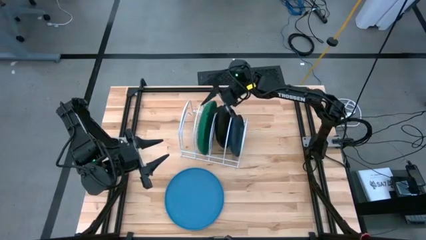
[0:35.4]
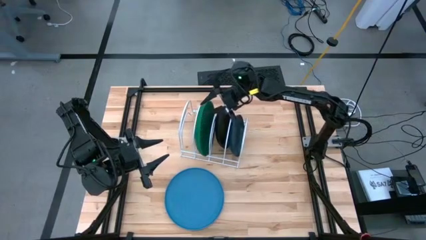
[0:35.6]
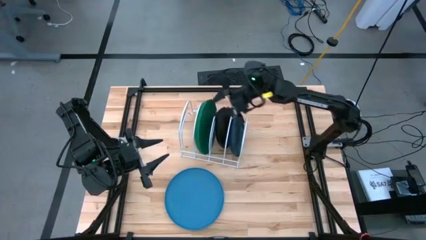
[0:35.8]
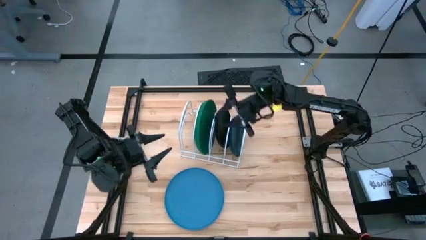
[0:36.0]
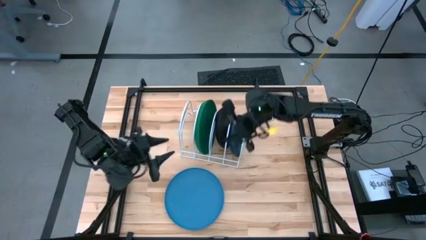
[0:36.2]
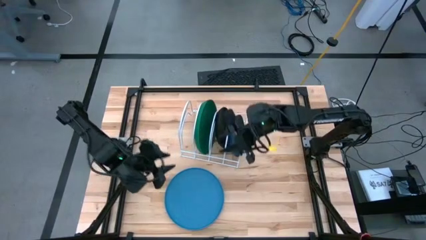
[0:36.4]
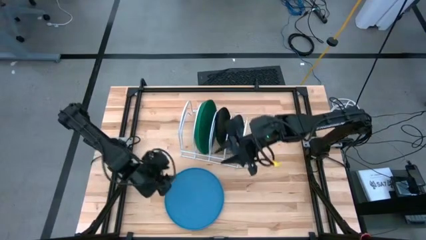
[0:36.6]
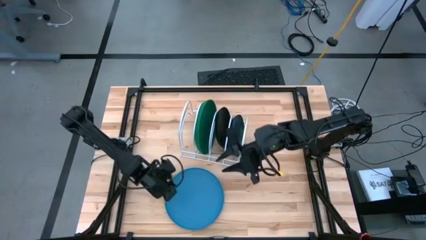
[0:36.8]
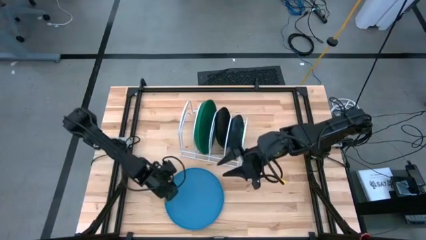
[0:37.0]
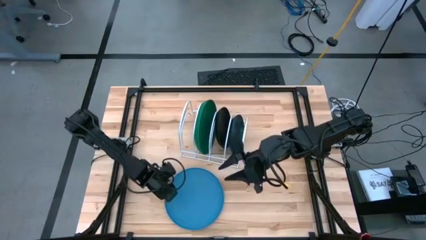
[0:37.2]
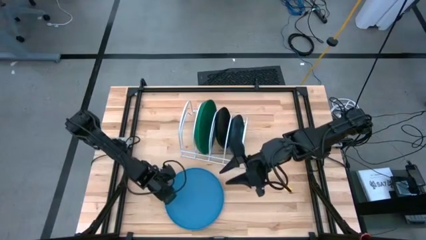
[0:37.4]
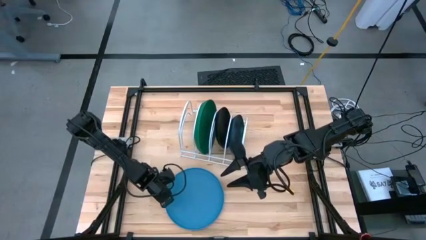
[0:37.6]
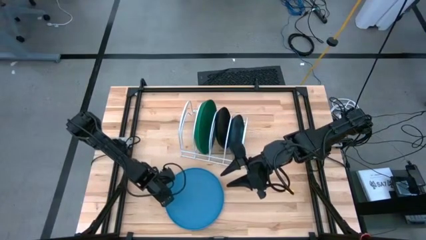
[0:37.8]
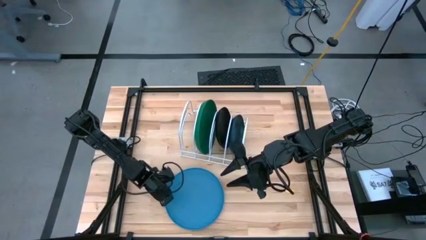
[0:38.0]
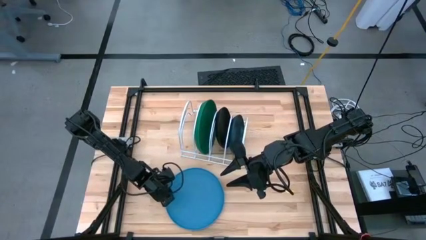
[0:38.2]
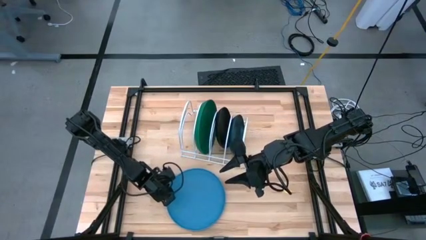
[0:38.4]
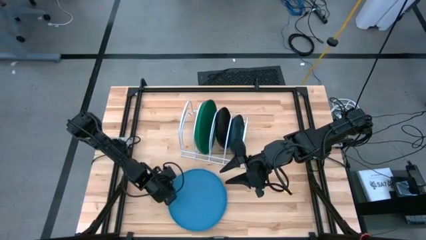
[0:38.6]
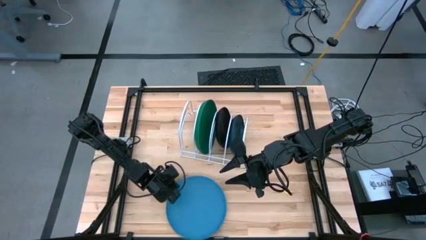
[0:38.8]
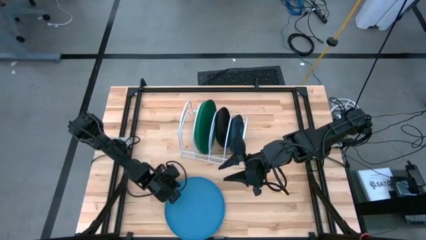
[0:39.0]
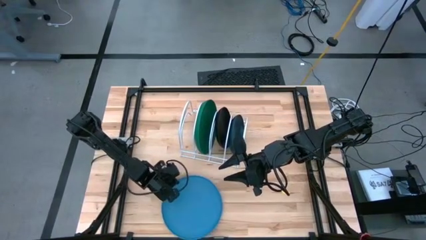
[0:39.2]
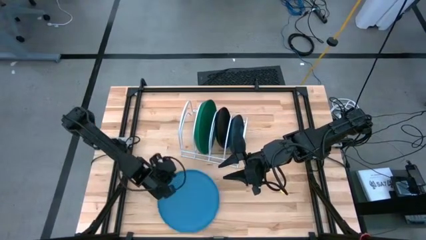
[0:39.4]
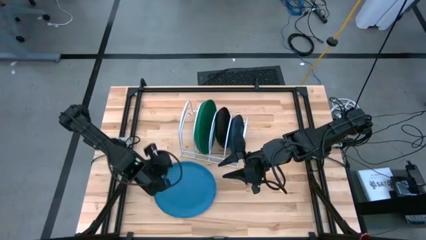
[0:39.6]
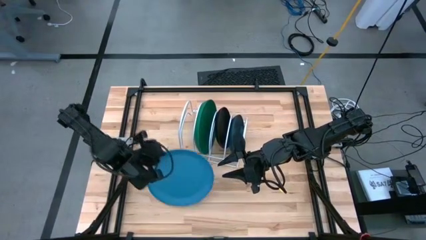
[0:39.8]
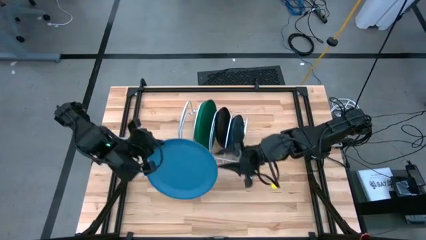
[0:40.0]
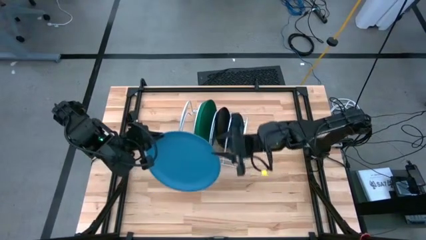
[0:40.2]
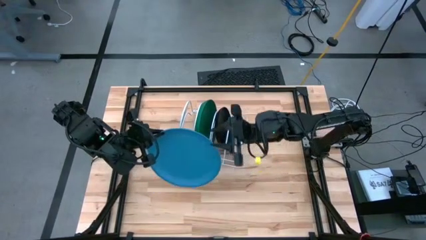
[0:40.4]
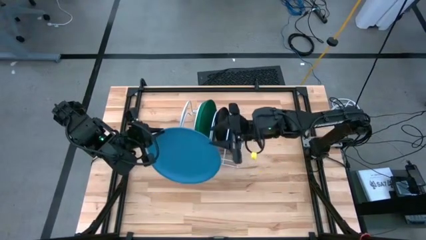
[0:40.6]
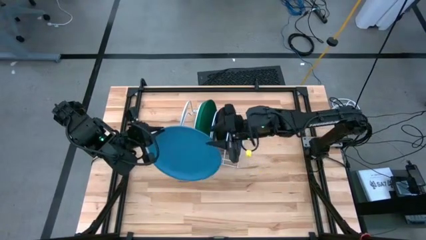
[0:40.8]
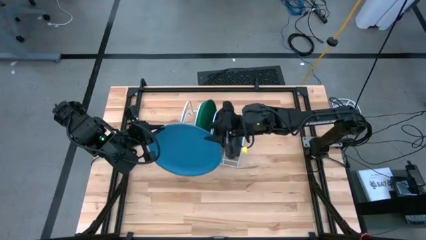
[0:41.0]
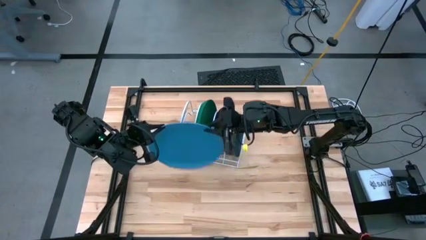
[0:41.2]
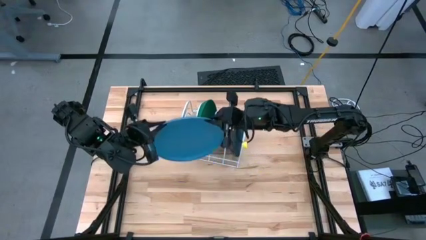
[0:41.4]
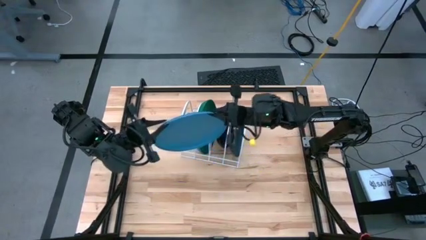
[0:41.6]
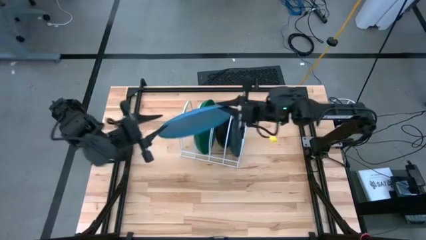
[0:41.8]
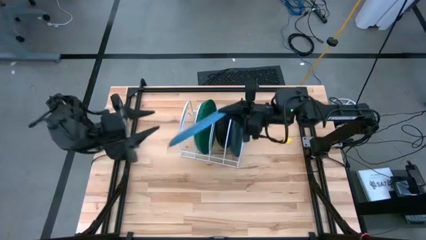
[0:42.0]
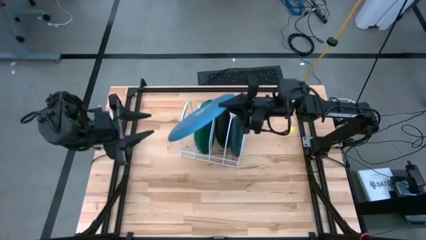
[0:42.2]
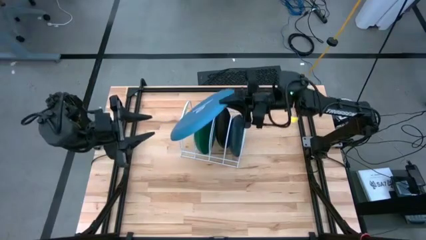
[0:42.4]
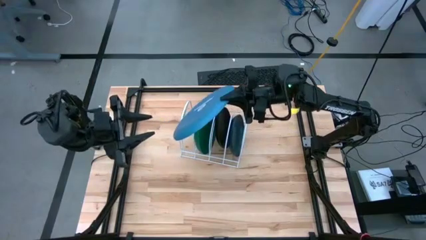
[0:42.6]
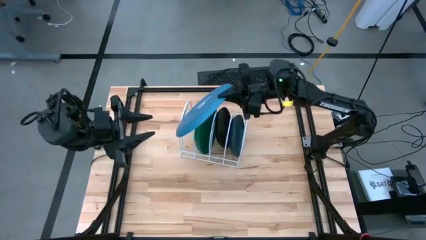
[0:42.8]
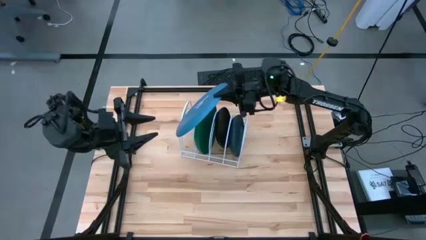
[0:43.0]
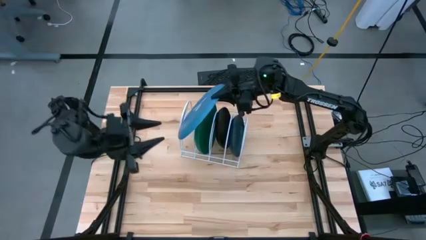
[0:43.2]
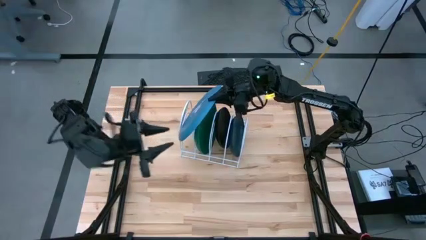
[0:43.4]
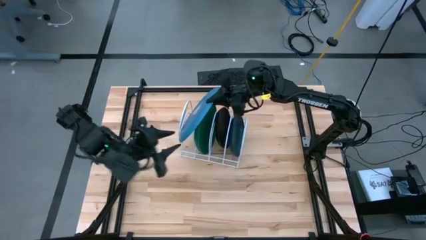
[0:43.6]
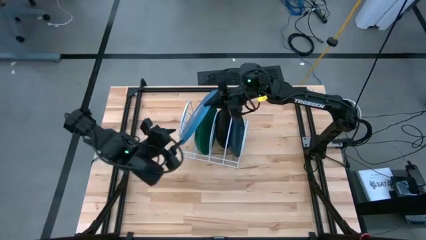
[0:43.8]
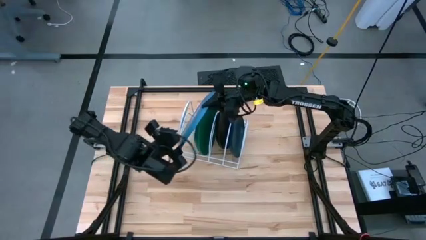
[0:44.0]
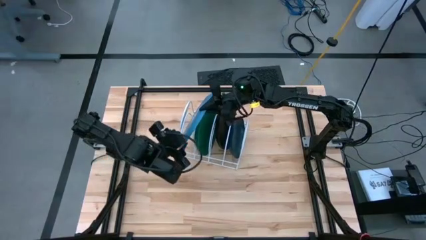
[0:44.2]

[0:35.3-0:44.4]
Task: Sort dishes
Put the light blue plate into the dish rack

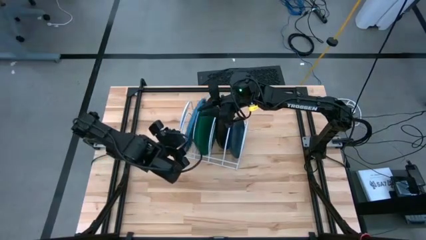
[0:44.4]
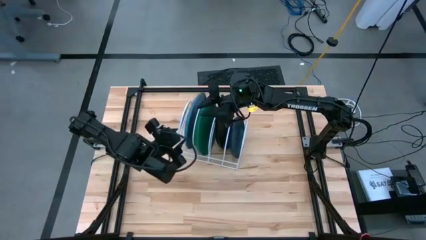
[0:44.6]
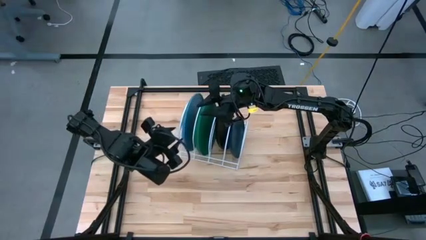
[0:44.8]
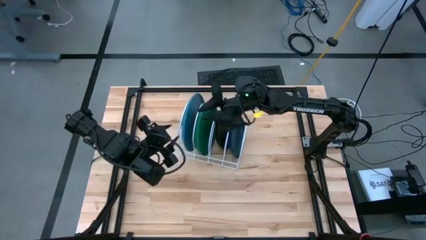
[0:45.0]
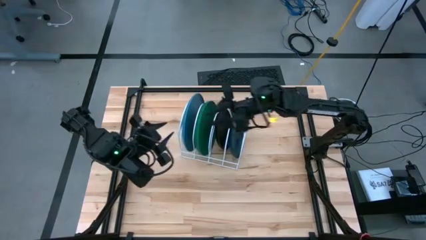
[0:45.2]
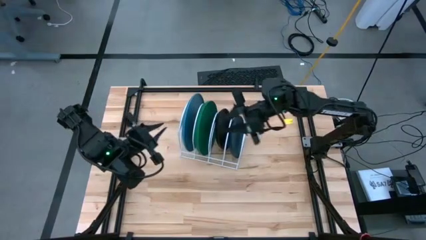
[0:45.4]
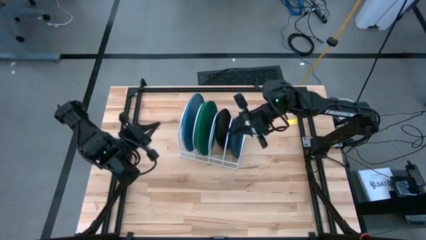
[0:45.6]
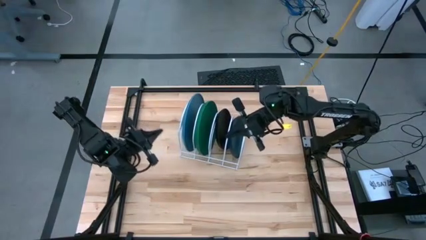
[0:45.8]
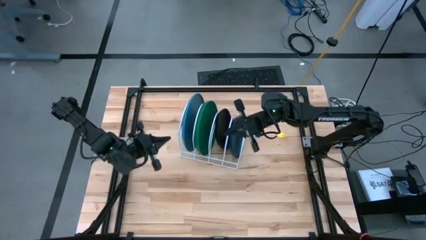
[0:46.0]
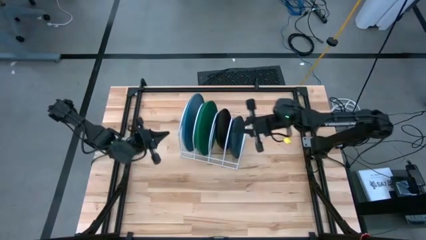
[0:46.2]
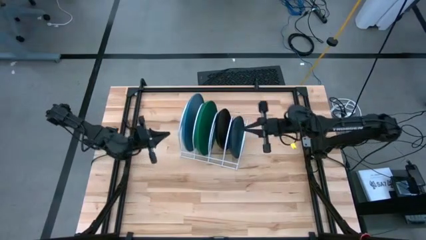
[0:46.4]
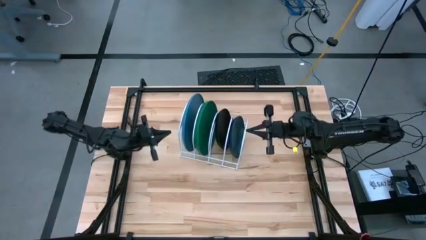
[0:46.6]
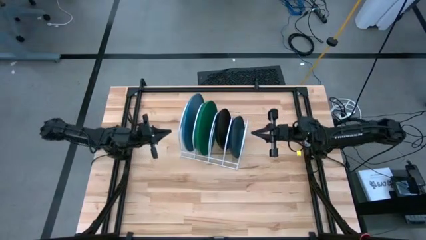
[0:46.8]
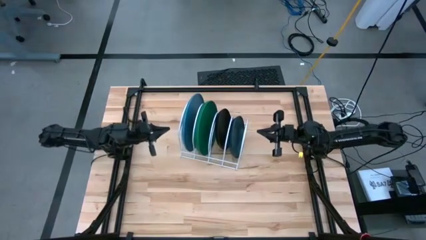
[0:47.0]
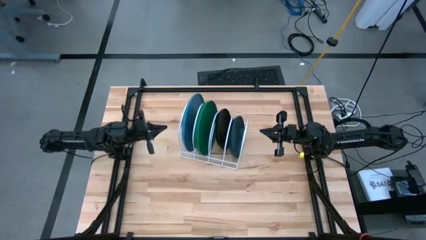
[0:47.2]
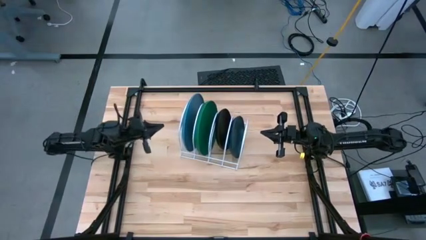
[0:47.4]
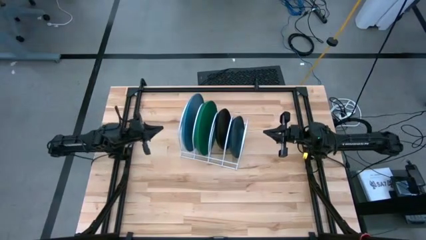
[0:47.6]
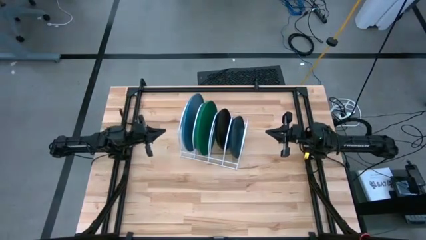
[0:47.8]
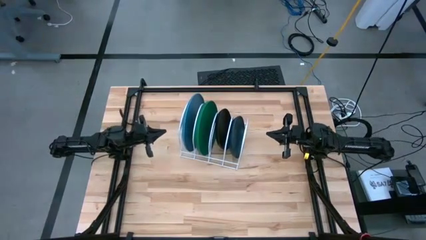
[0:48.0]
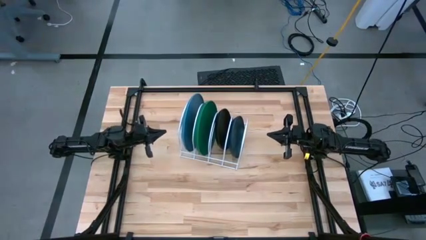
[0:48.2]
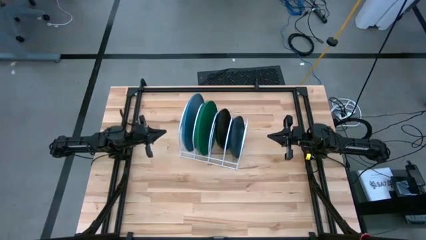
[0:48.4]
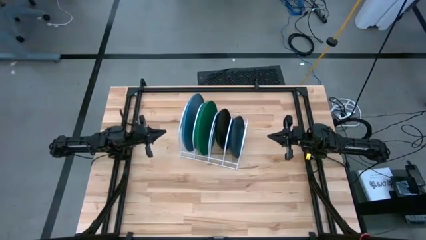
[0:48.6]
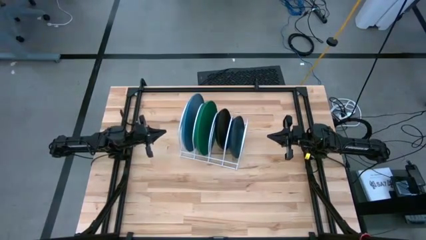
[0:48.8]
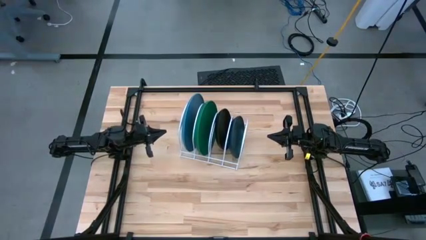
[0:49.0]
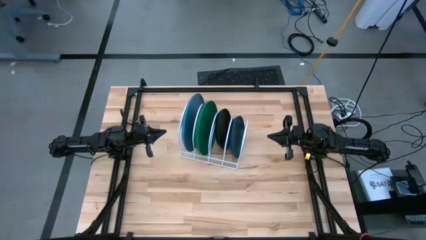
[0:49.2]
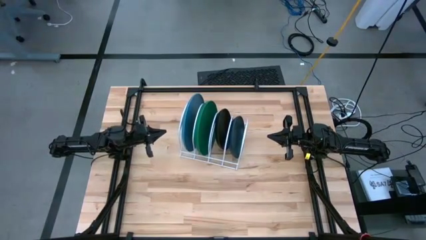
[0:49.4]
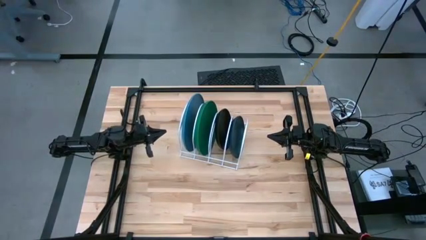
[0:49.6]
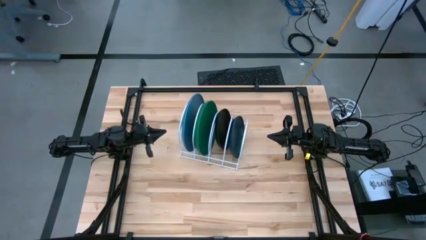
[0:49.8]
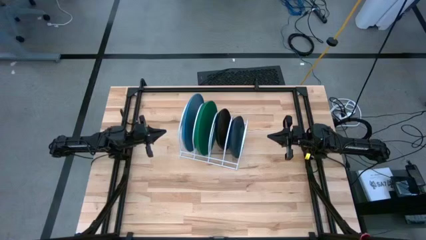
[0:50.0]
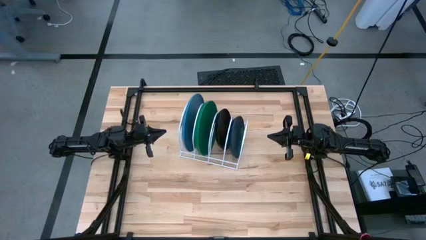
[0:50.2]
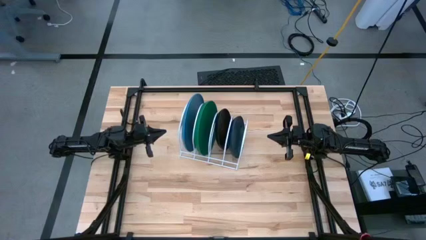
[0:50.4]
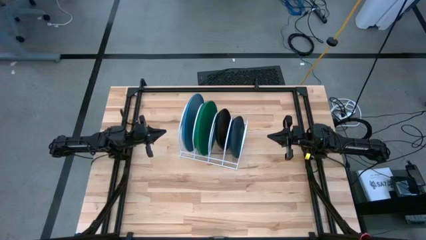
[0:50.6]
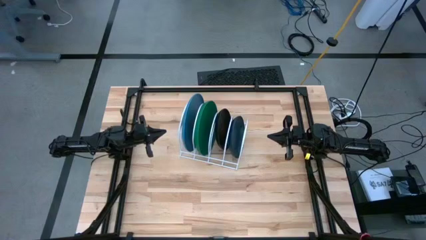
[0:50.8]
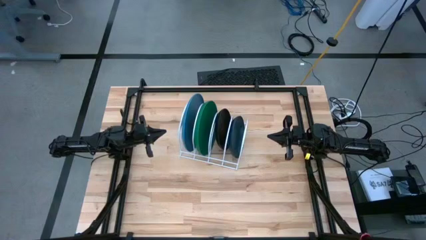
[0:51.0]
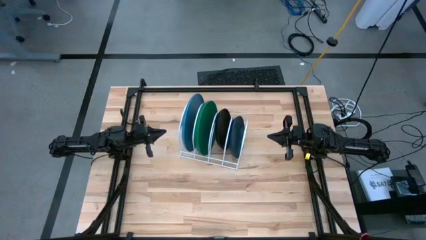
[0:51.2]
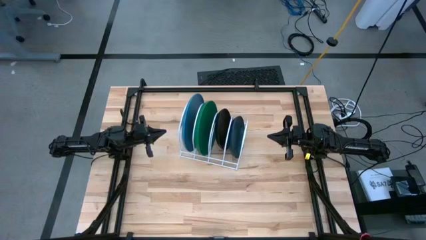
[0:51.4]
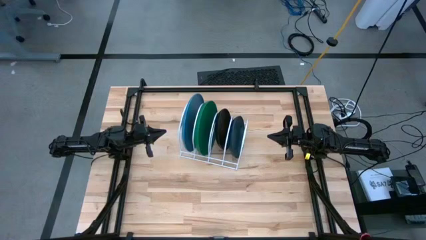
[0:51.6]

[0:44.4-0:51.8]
Return to Home Position

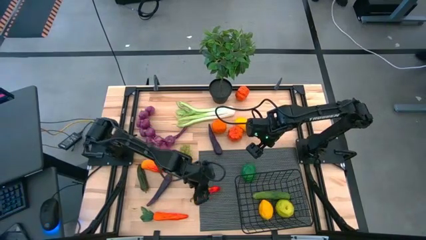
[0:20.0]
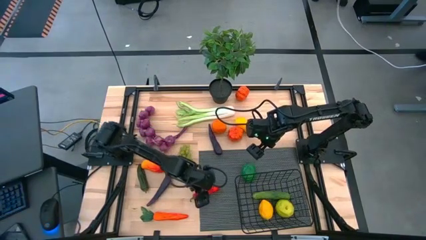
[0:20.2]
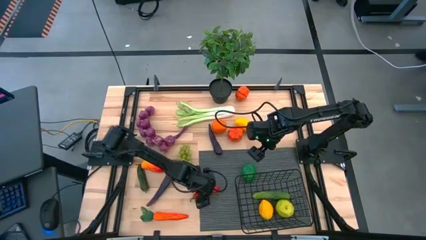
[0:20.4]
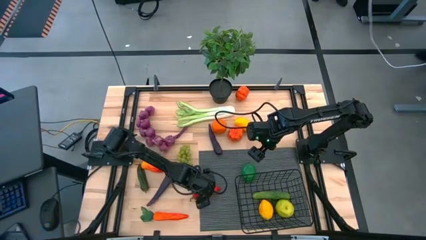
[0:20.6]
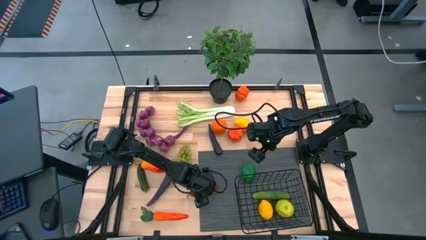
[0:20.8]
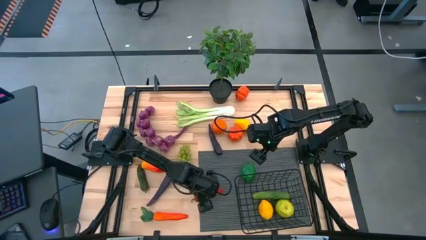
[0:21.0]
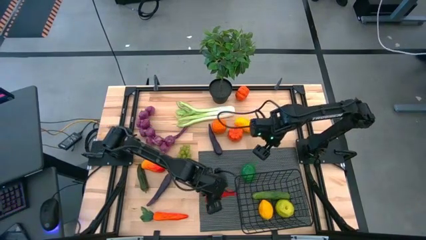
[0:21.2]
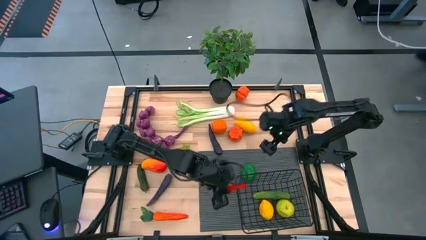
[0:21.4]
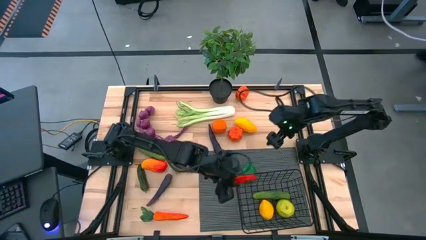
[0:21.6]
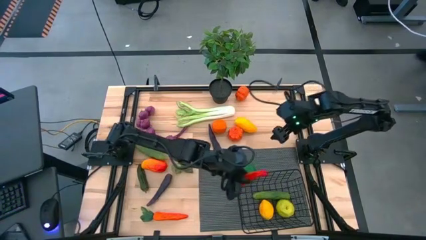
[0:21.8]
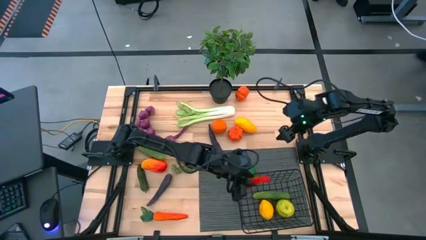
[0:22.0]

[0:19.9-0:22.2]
Task: Build produce basket
Put the red chili pepper into the black wire basket
